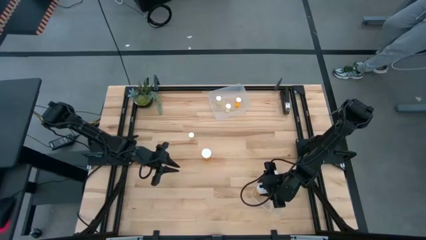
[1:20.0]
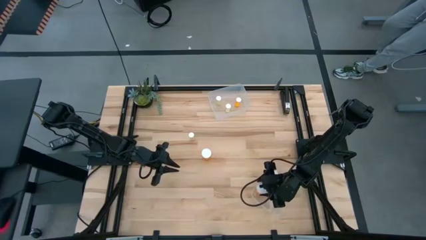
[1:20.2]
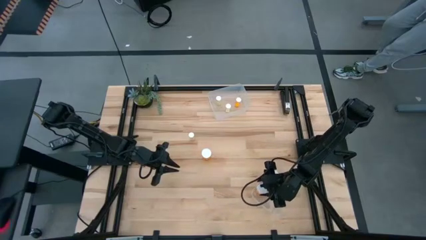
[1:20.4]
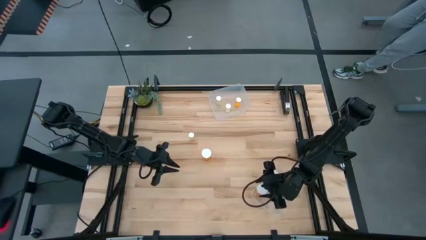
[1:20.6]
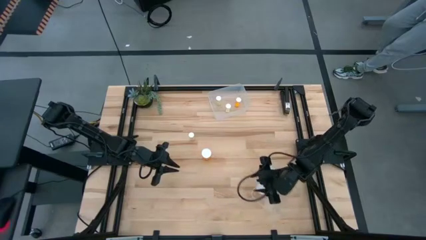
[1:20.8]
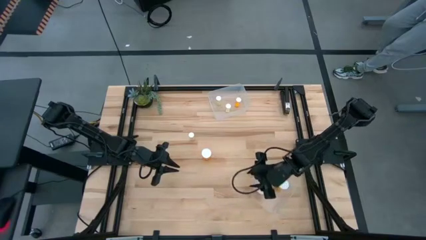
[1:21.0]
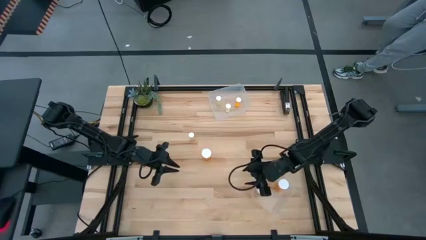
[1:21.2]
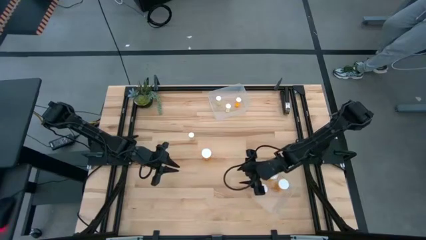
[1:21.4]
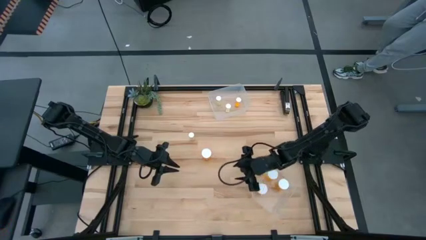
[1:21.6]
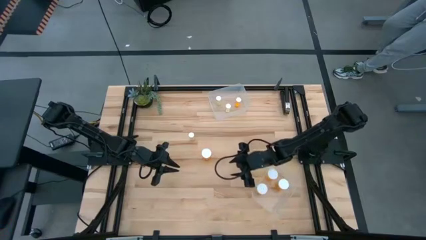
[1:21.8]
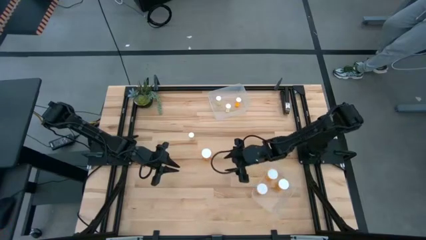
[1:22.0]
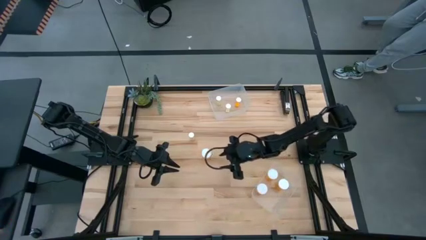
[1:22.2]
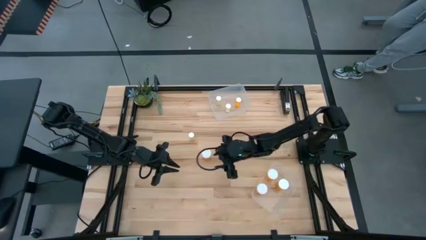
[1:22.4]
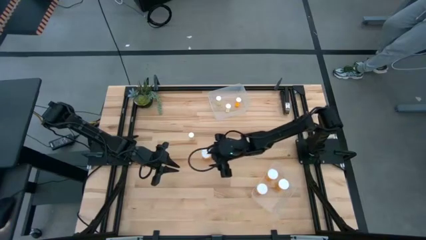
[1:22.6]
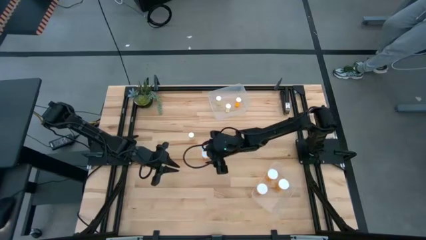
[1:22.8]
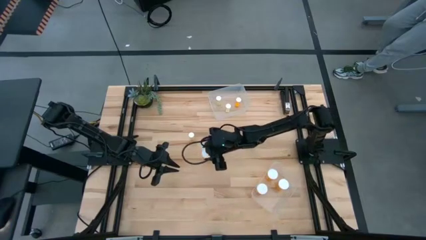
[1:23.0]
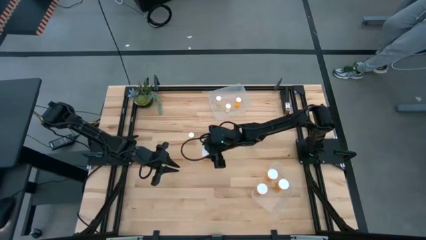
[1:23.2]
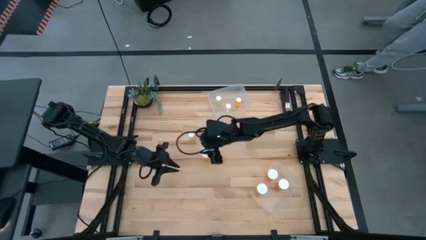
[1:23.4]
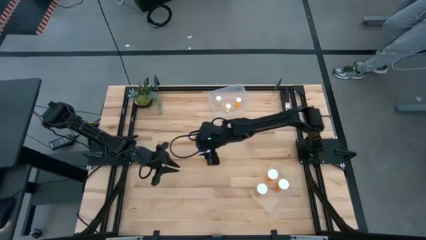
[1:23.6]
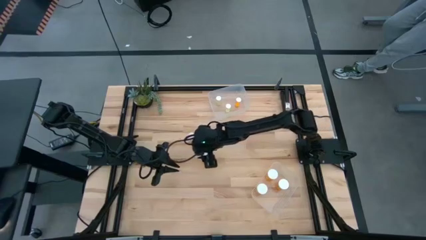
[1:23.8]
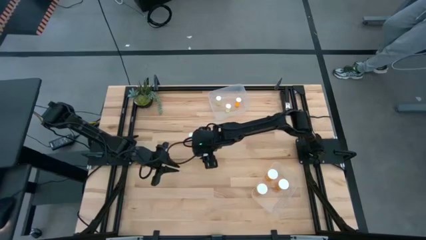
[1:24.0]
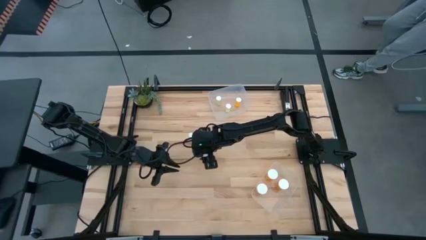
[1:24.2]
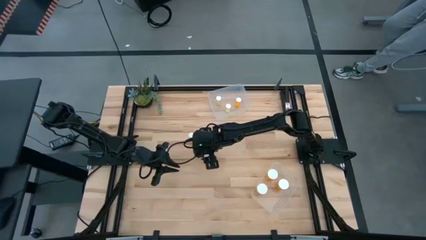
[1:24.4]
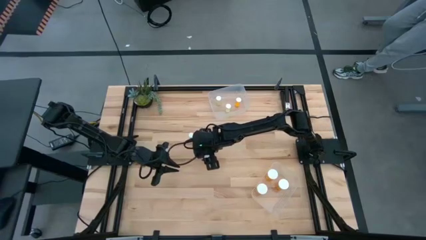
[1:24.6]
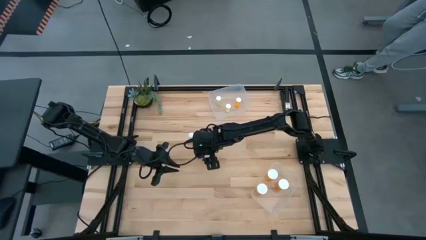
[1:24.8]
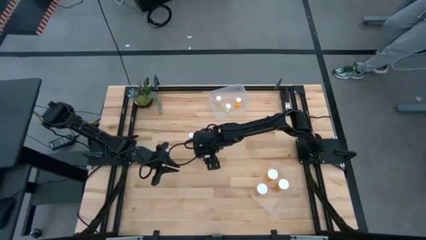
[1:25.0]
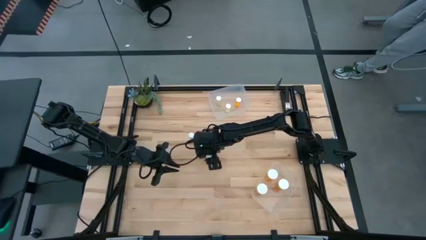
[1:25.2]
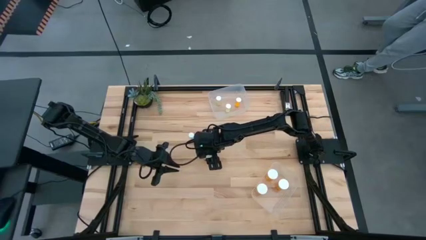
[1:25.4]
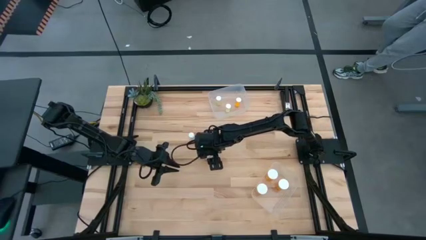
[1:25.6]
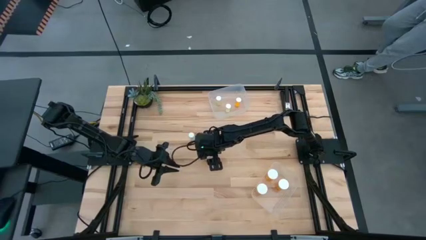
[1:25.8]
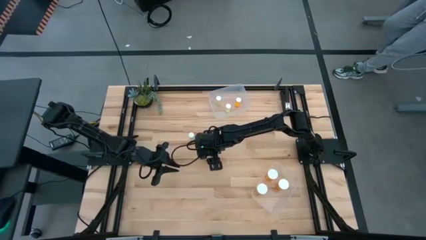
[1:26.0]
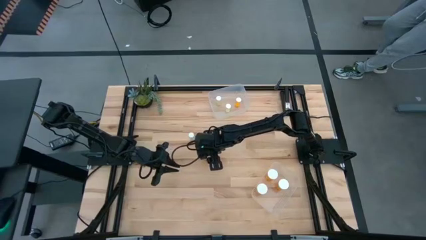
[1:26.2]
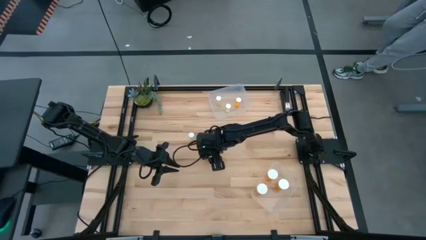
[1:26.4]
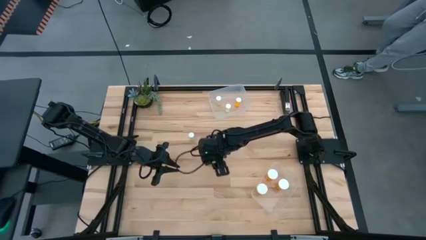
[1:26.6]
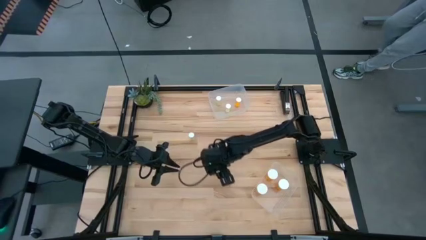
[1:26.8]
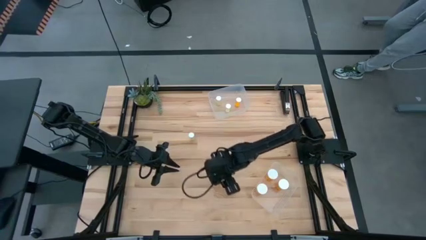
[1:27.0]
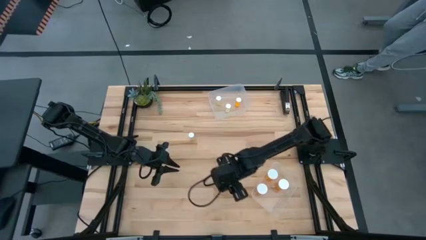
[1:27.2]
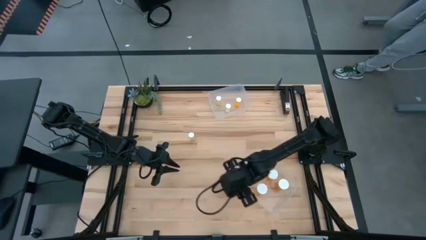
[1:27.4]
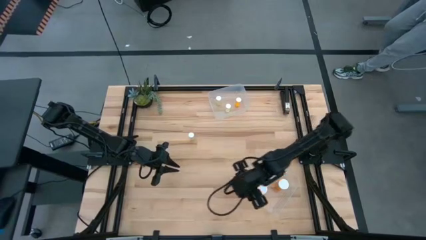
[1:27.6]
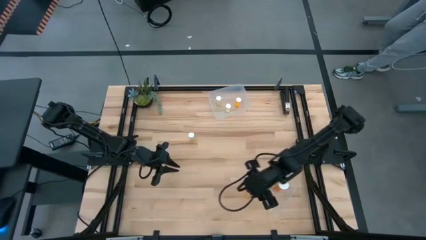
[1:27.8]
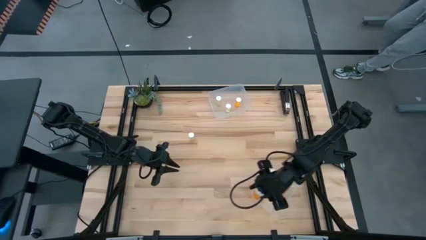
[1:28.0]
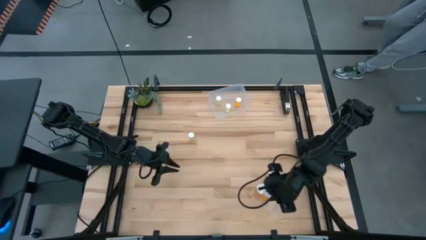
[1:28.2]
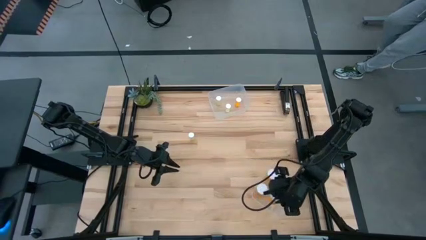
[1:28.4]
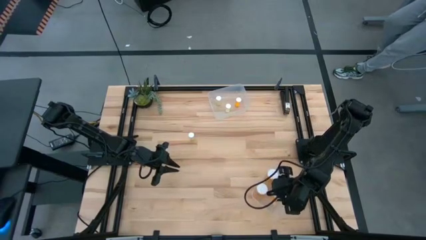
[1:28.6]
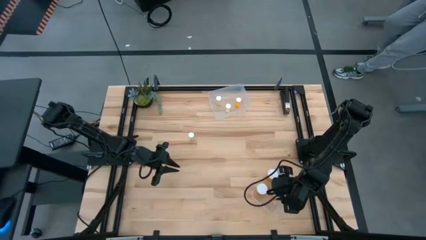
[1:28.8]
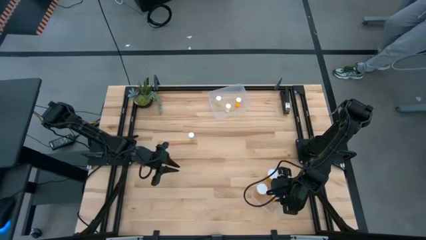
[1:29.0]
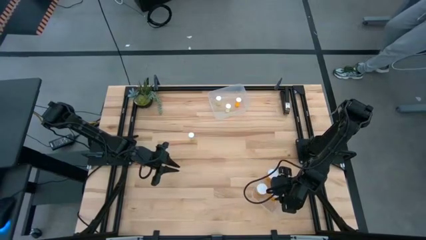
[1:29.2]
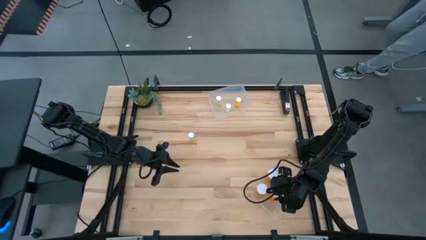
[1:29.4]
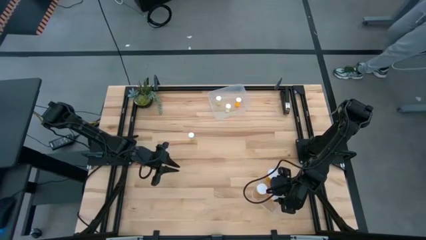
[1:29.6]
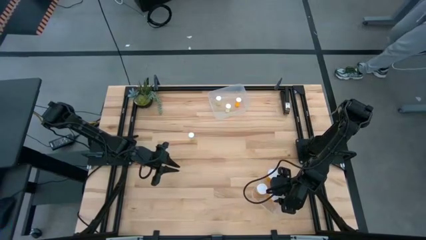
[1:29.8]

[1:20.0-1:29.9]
Task: Pick and place medicine bottles into bin by pill shape (circle, oval)
Put the large orange pill bottle into the bottom transparent bin

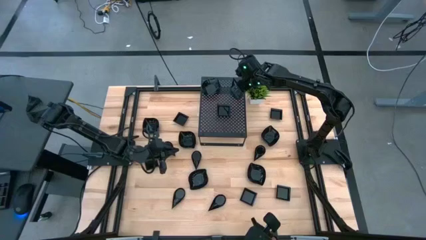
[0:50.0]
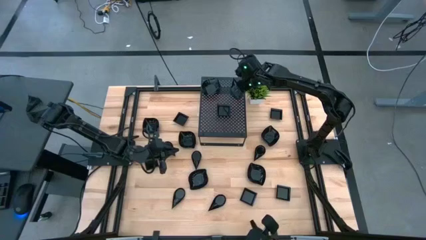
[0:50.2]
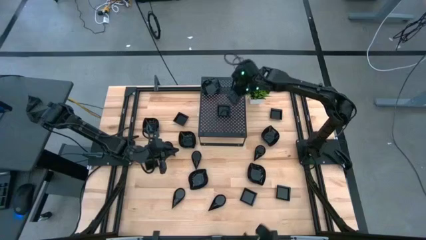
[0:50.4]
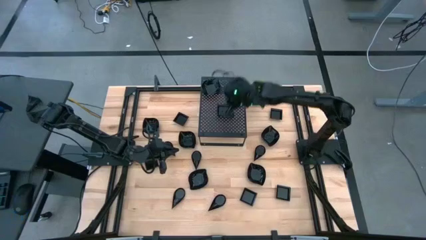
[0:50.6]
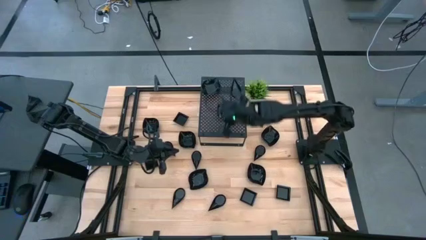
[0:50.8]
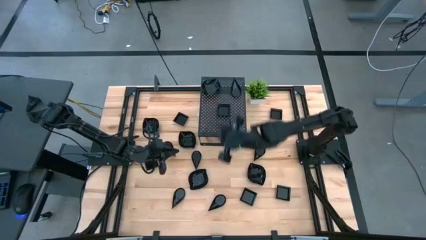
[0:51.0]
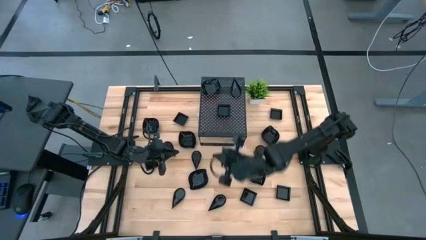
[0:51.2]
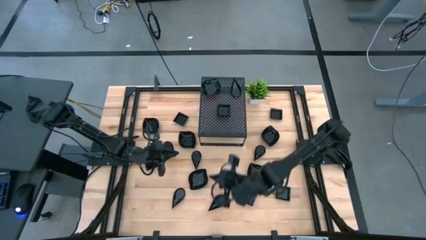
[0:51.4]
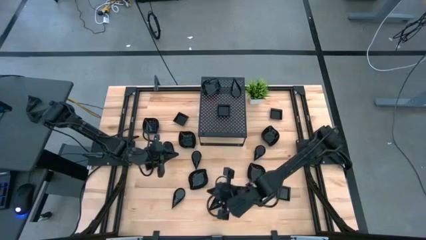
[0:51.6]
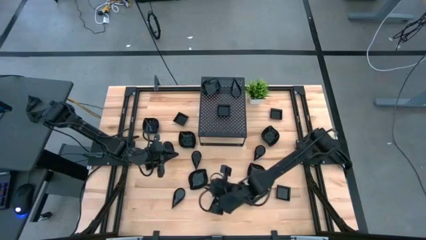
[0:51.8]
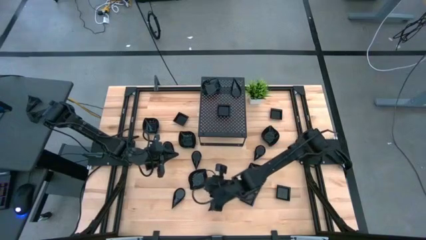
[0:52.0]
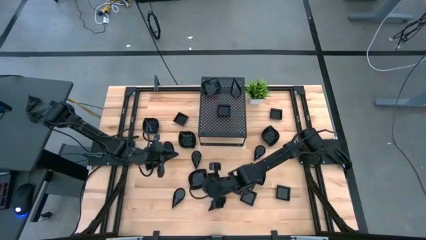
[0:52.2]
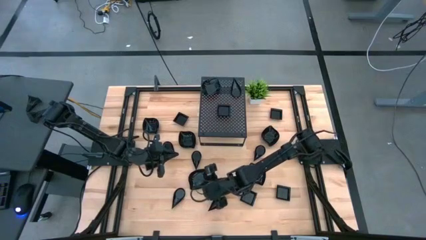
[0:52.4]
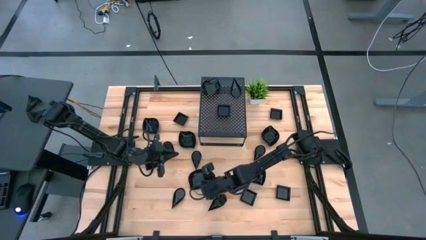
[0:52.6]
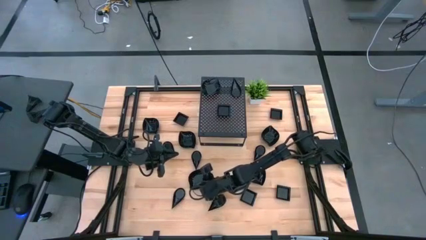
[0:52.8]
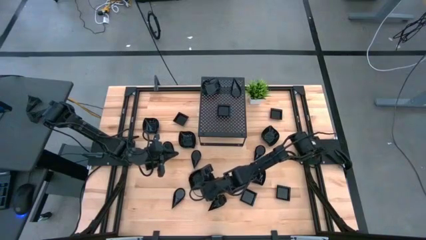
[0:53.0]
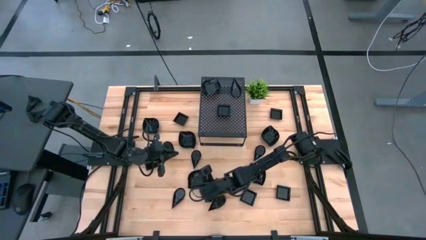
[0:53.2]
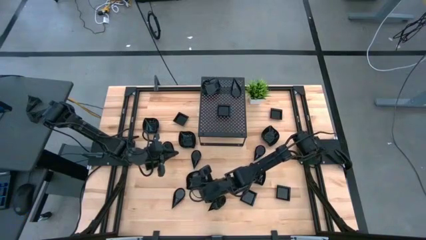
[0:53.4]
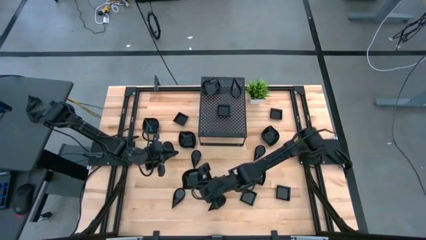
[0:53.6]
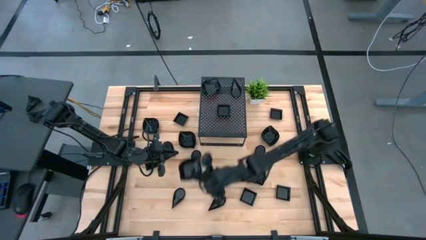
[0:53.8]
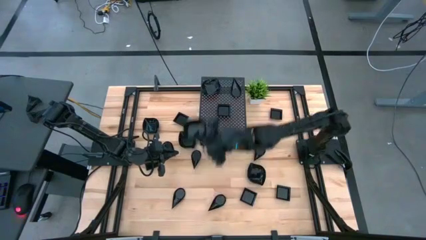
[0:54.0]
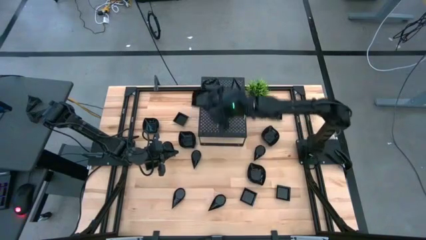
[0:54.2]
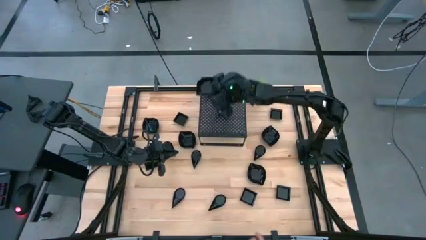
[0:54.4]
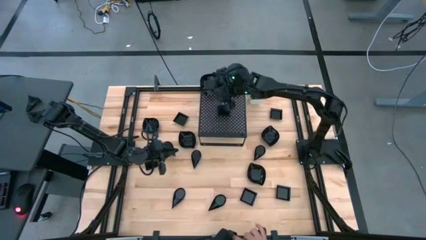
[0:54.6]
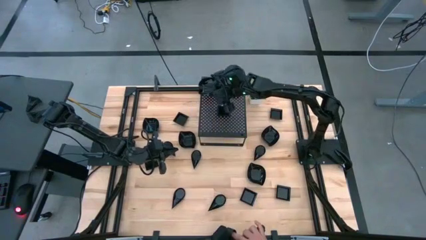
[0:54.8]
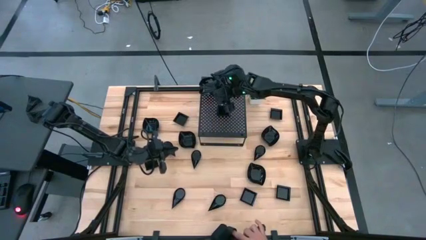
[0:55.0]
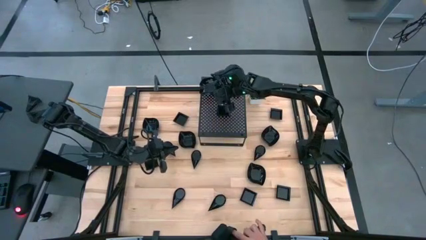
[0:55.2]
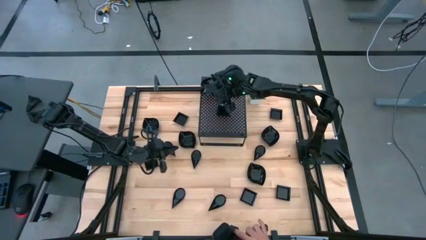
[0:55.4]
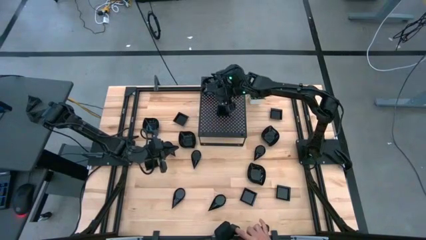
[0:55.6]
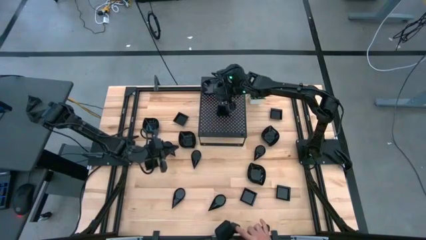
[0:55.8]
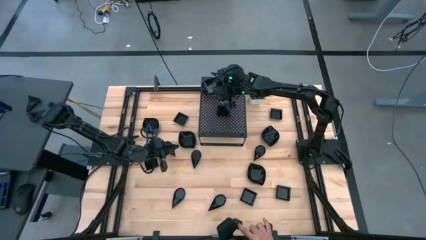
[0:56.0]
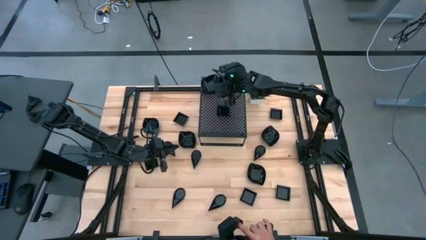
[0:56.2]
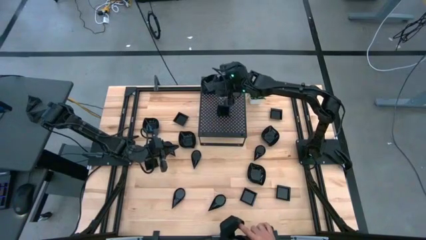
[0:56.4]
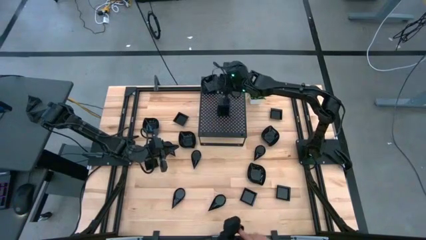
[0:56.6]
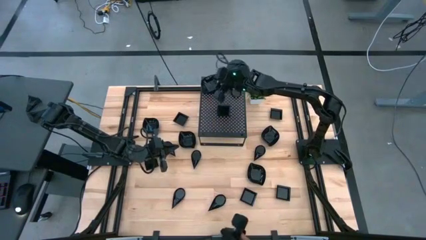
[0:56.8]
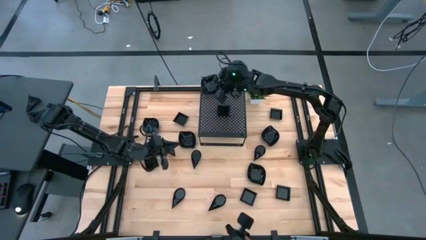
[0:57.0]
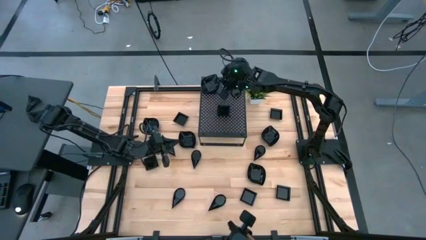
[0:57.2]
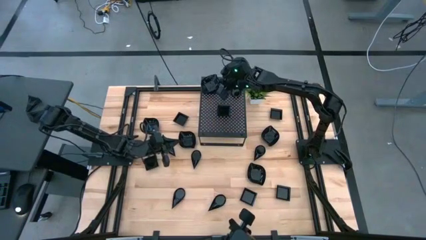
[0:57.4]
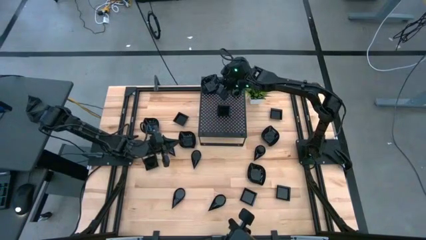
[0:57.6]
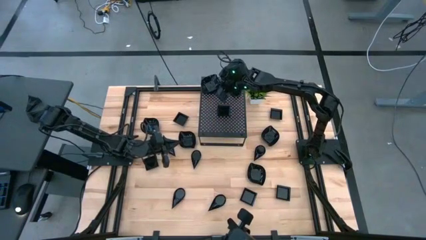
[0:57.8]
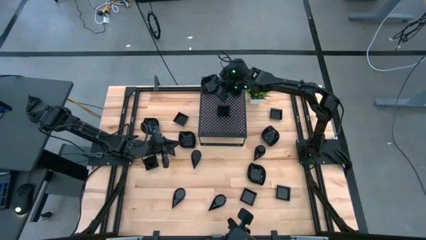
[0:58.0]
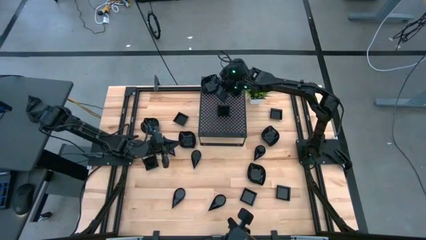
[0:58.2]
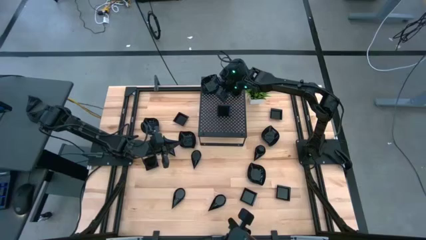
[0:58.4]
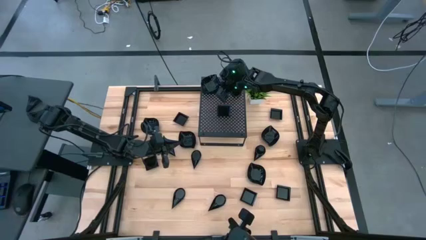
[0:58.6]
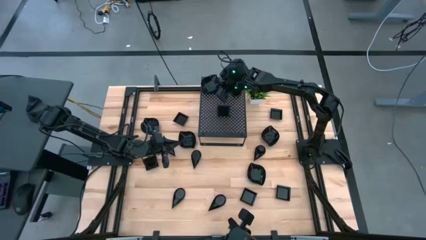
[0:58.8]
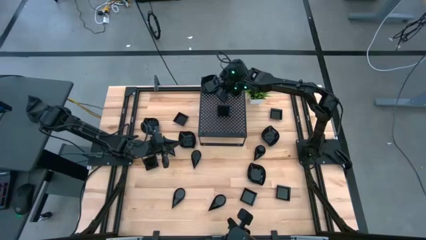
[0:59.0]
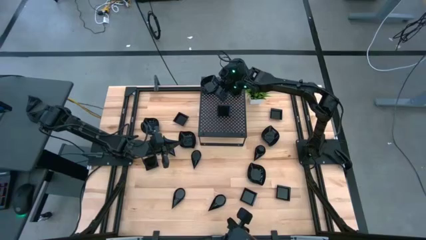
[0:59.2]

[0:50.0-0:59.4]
Task: Pick & Place Mini shaped plates
Stack the black leaf-shaped plate on top of the black leaf-shaped plates on the shelf
